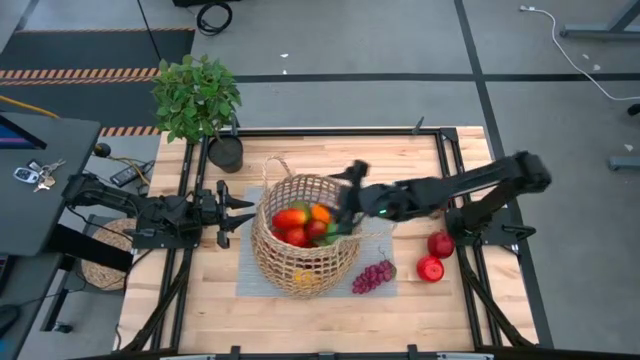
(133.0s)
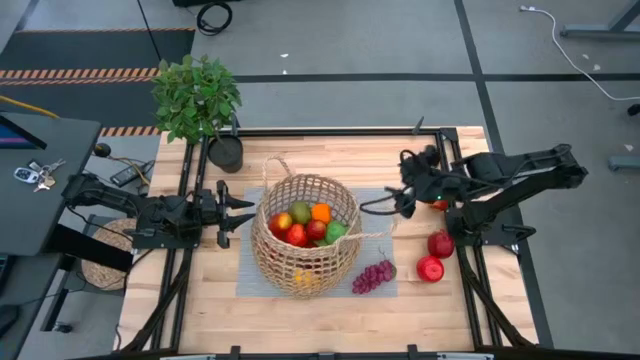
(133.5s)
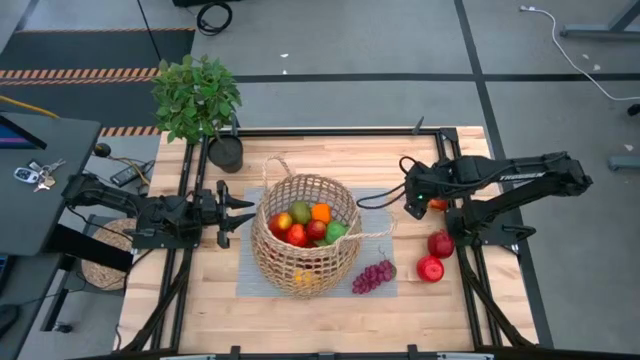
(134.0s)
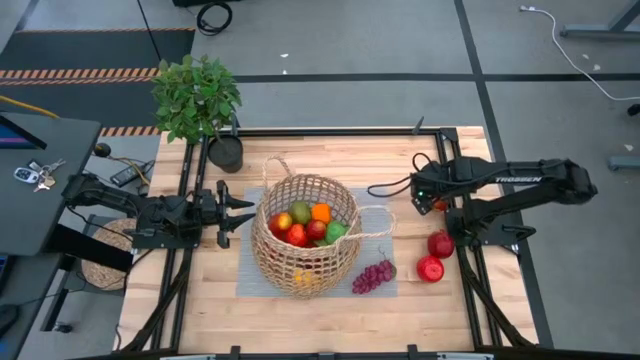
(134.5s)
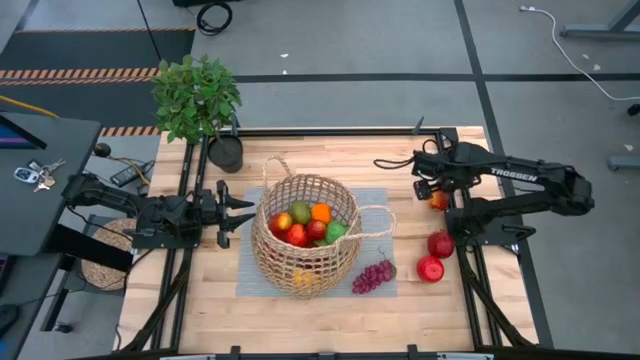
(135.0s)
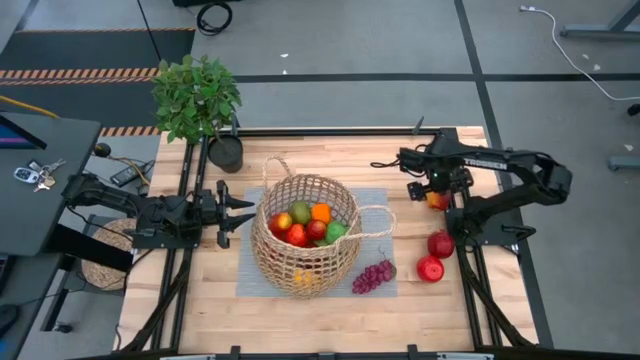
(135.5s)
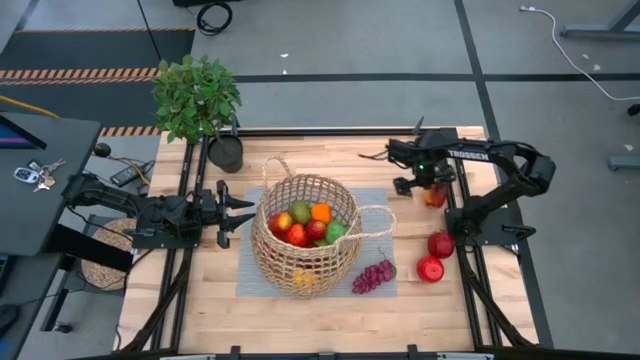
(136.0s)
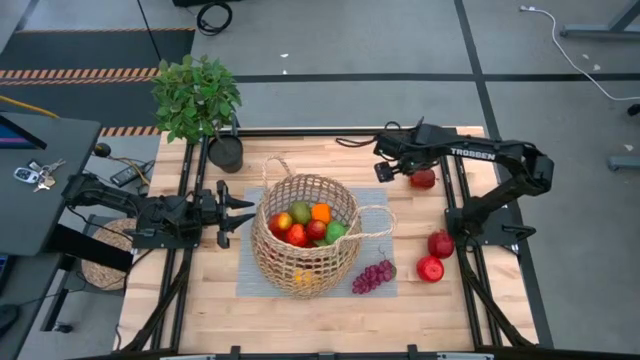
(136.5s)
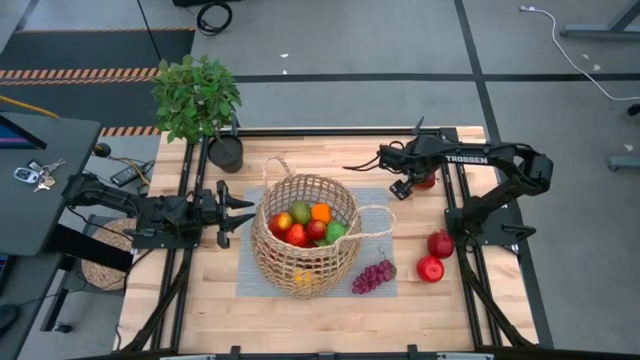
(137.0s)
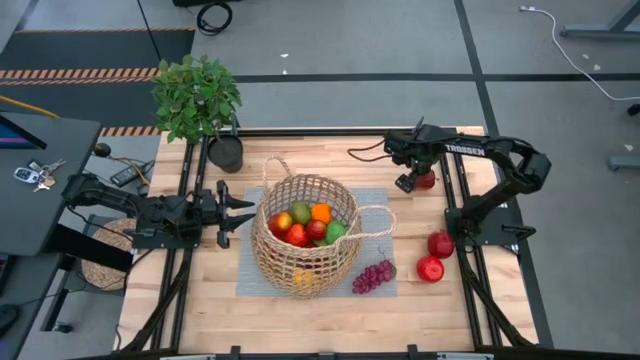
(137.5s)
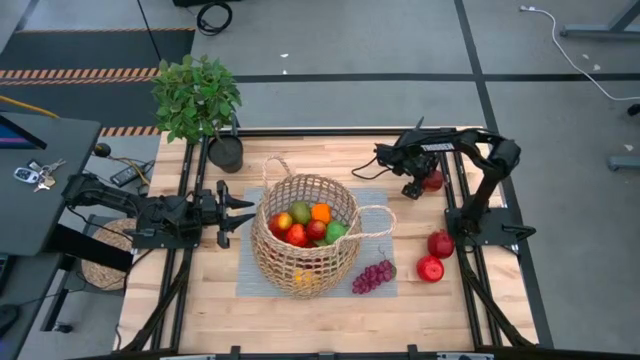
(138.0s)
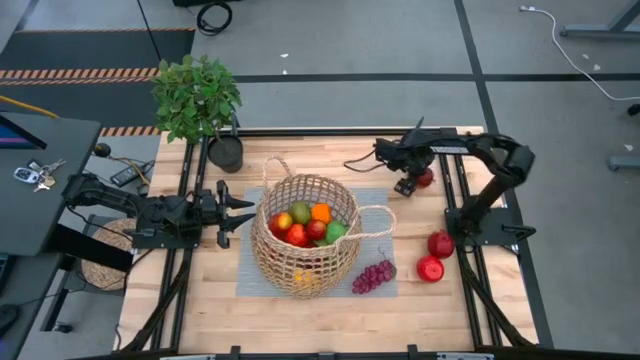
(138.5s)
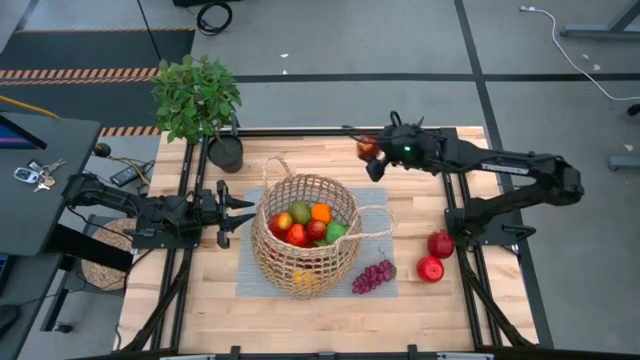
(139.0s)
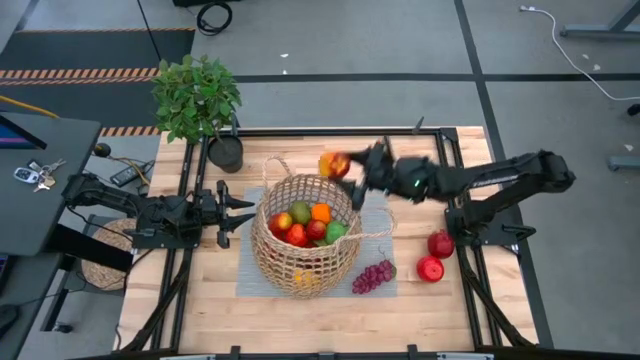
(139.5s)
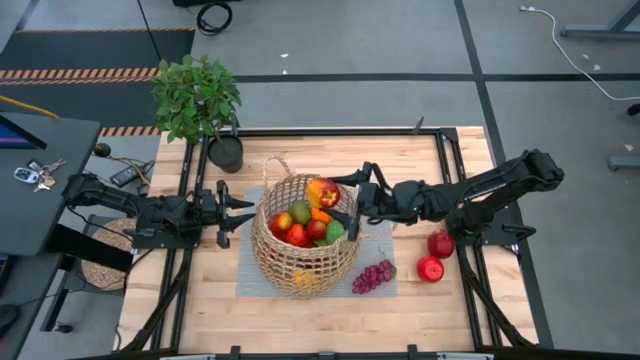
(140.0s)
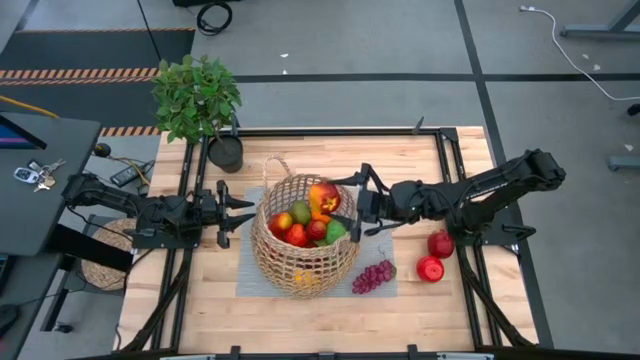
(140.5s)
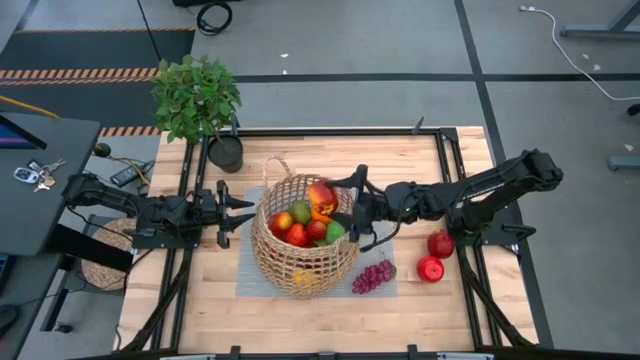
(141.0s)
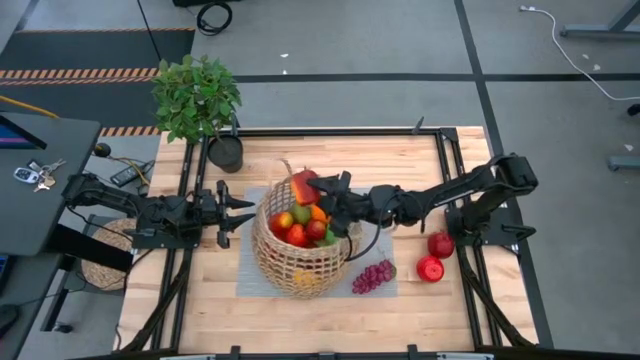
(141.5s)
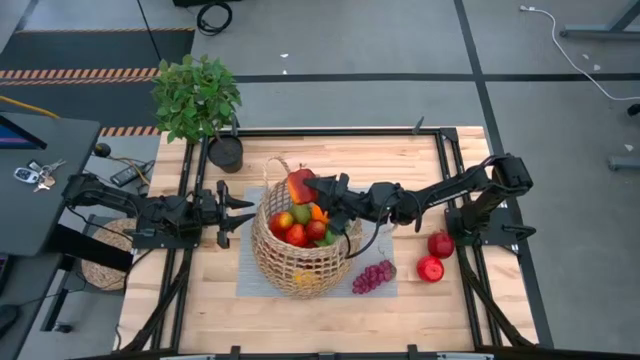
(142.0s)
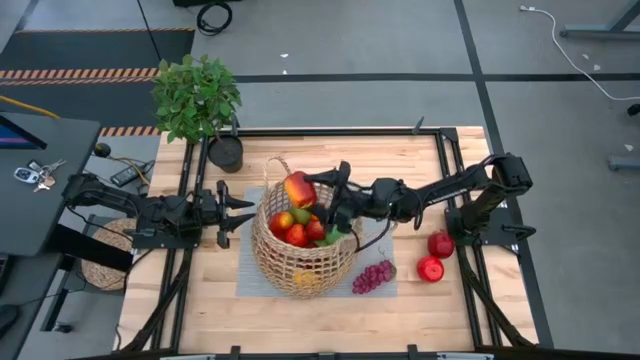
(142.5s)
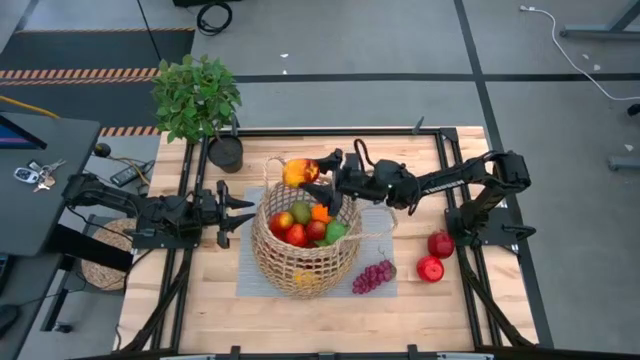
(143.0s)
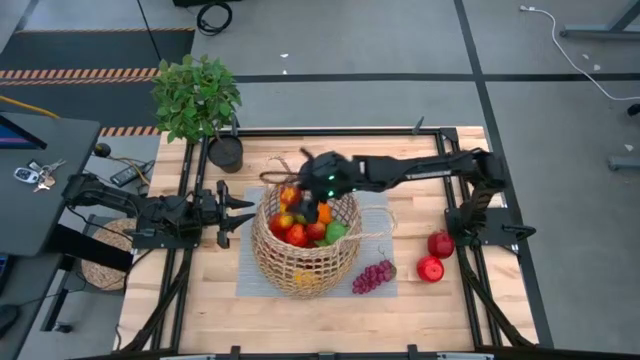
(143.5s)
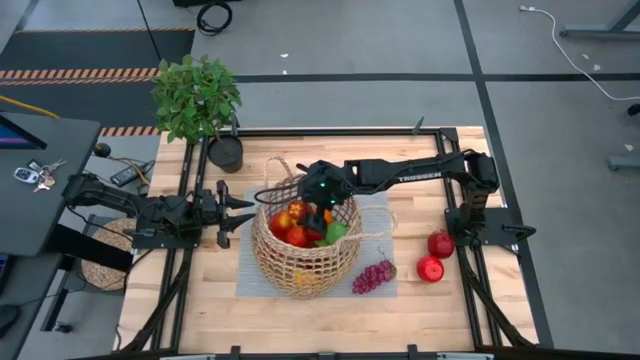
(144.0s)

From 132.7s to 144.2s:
Task: Build produce basket
Put the red yellow apple into the basket

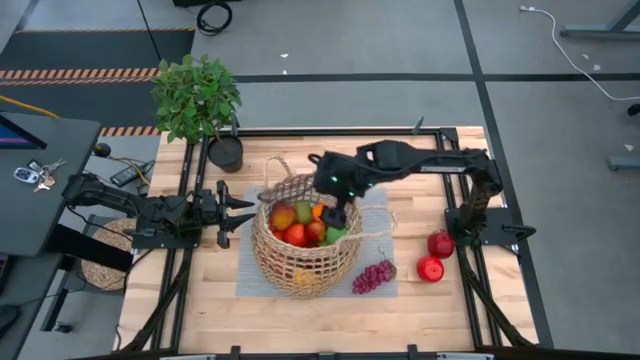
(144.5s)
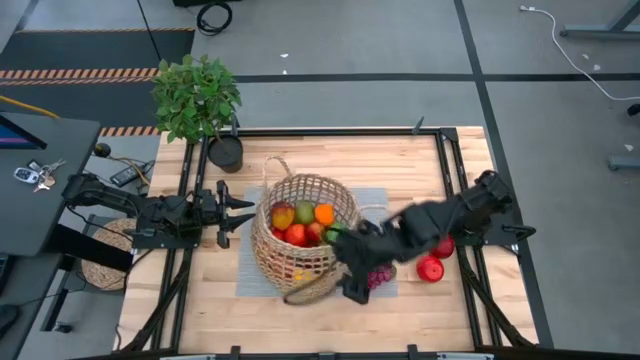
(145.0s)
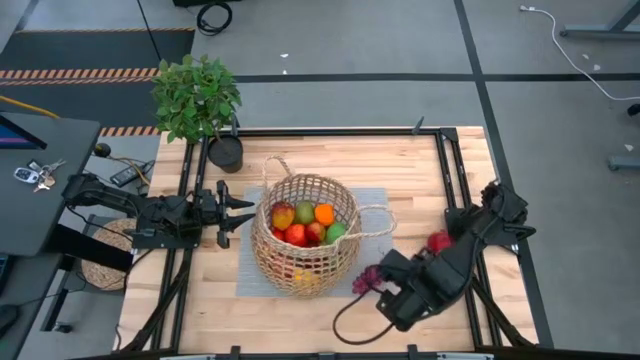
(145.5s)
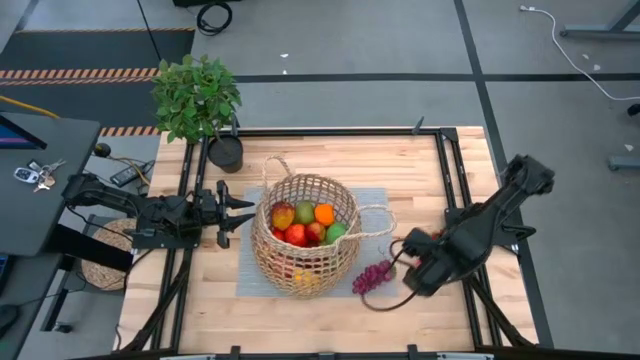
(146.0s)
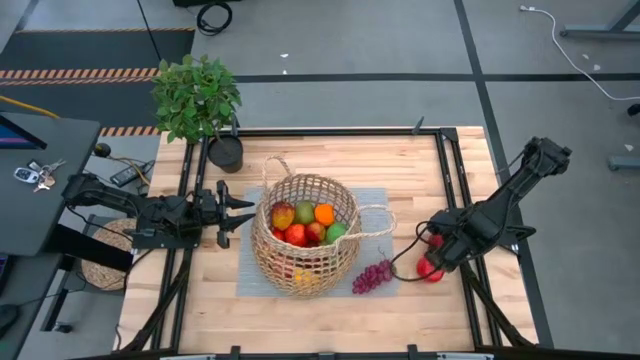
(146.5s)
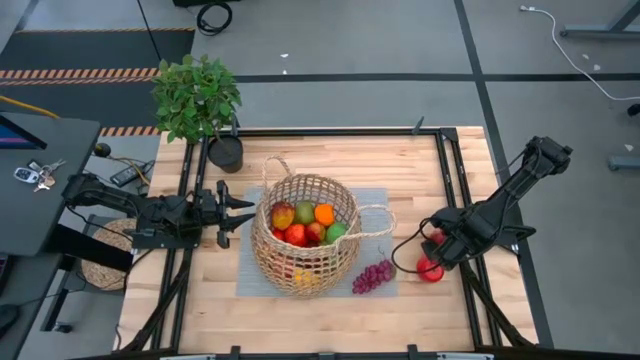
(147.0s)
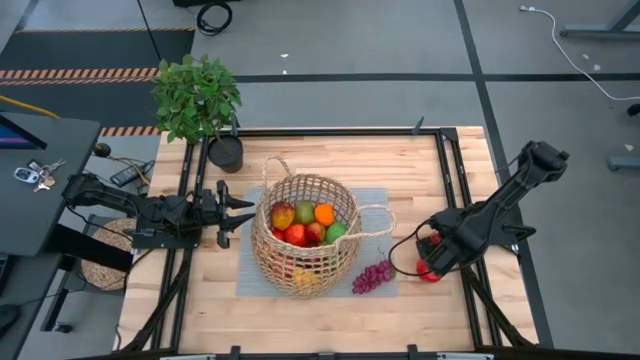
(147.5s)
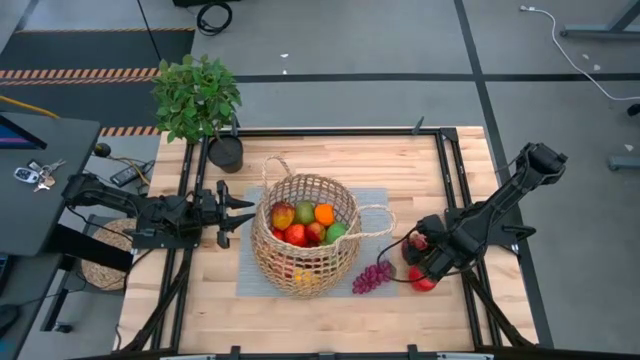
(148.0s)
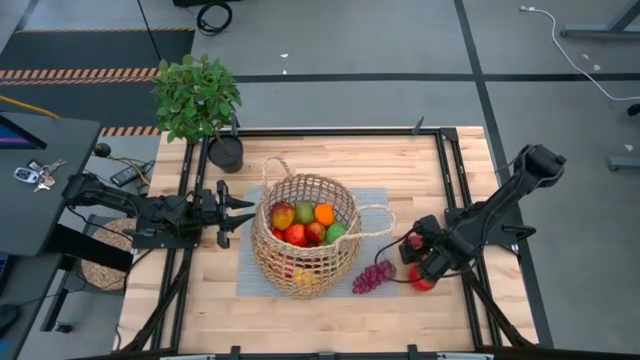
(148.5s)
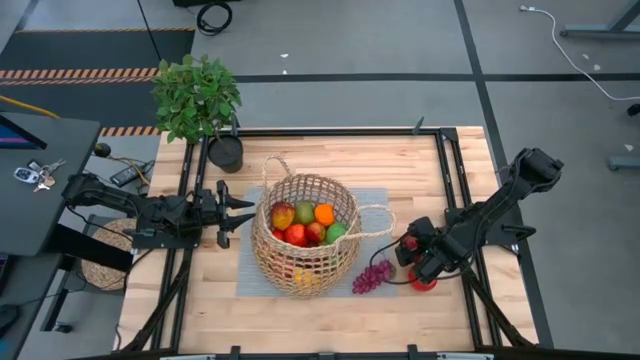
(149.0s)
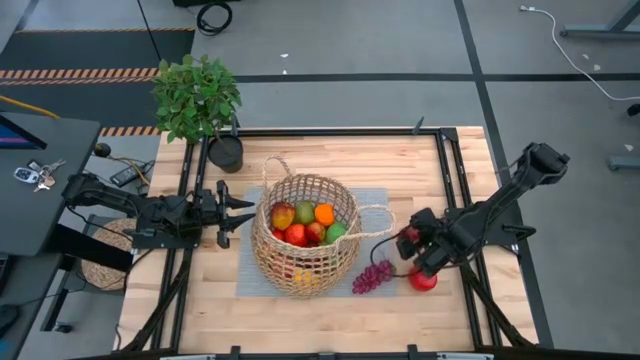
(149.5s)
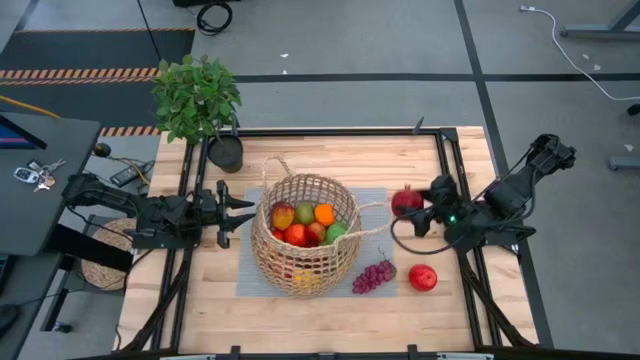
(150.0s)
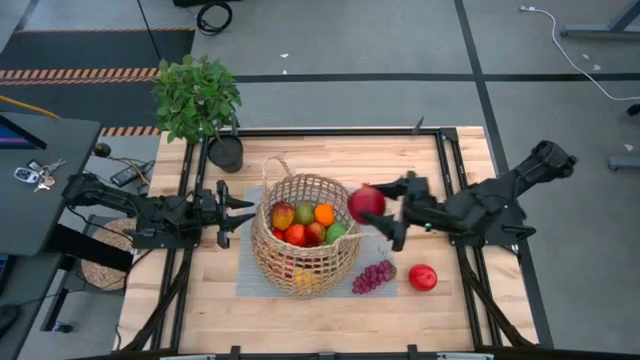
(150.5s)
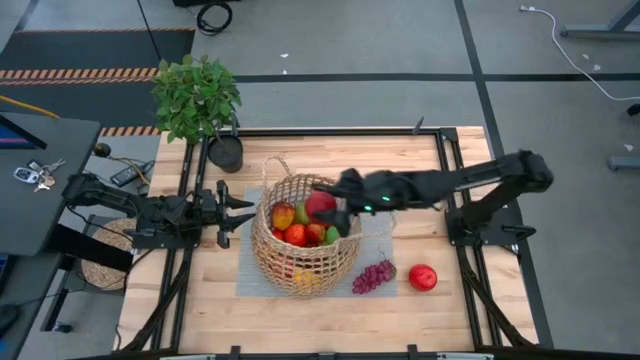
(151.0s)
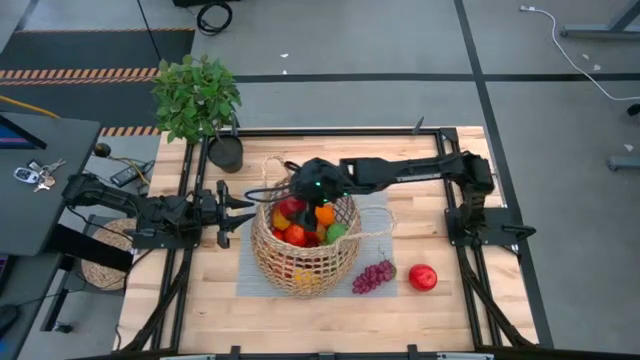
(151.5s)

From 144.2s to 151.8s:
Put the pomegranate into the basket

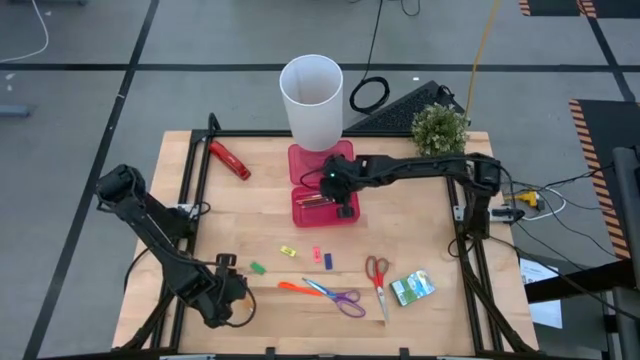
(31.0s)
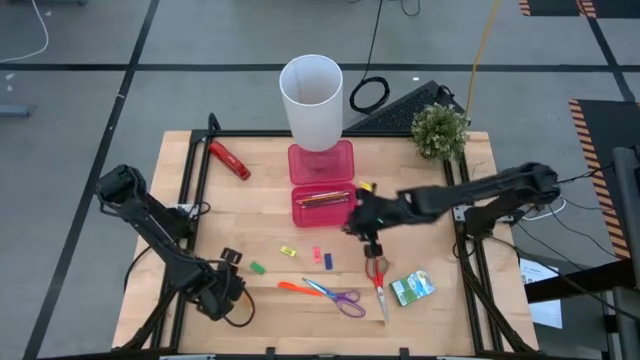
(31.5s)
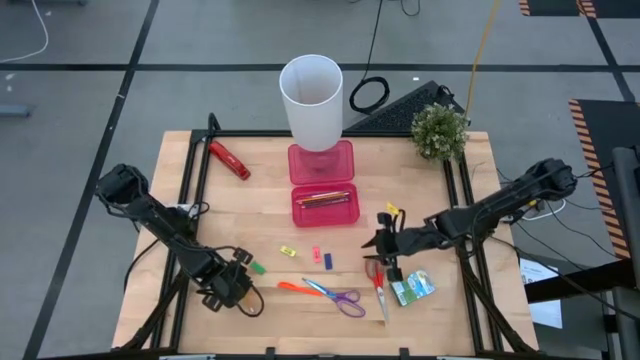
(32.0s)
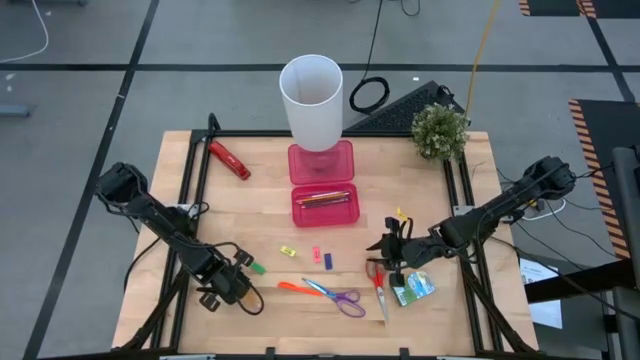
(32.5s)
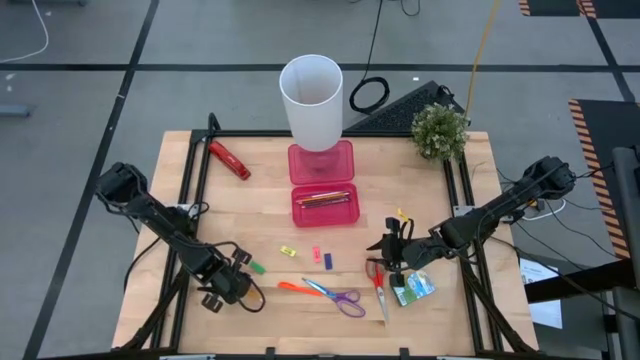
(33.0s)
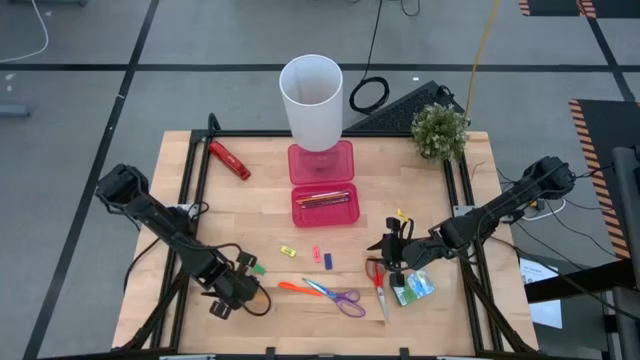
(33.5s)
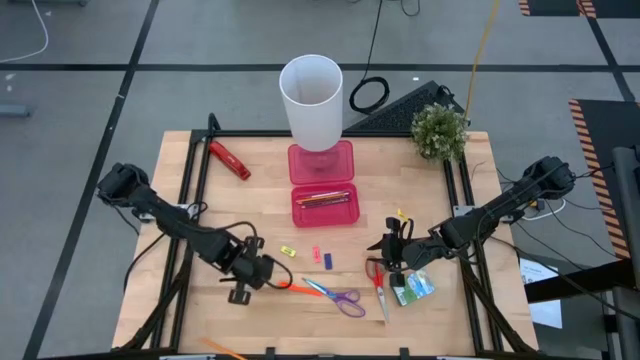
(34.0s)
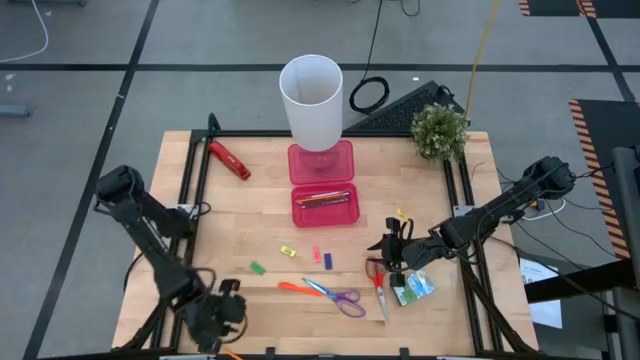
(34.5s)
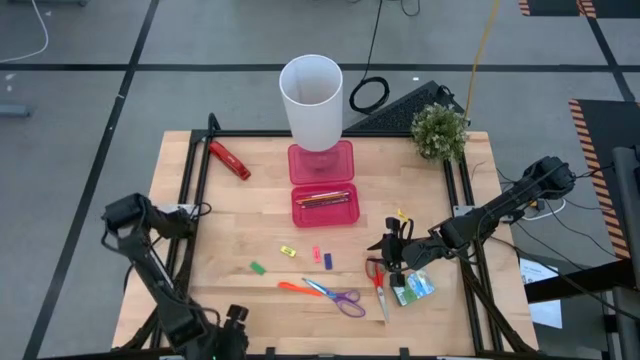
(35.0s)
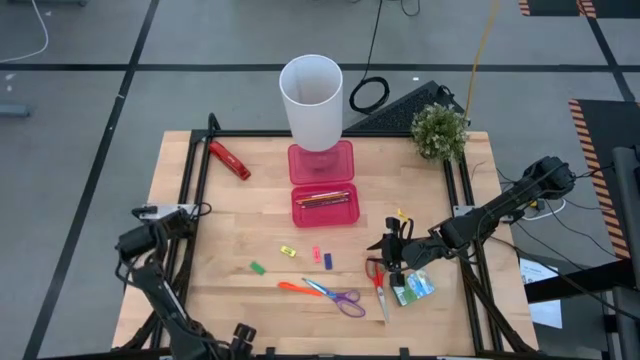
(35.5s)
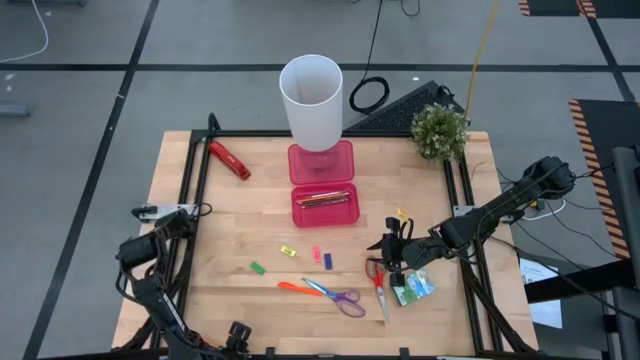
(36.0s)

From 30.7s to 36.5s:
Task: Pack school essentials
Put the yellow pencil into the pink supply box
